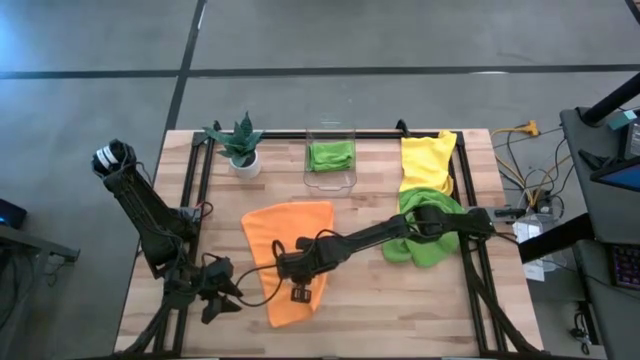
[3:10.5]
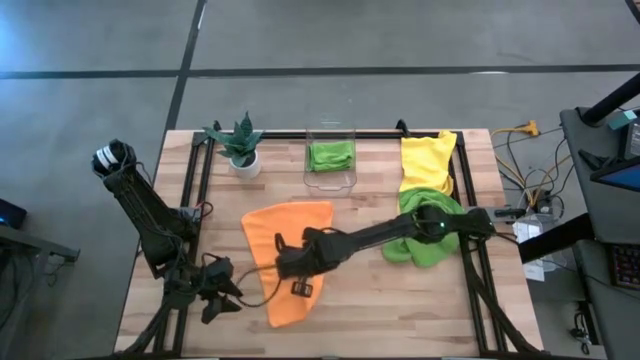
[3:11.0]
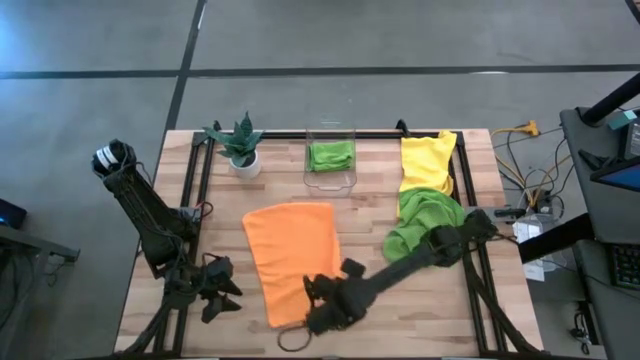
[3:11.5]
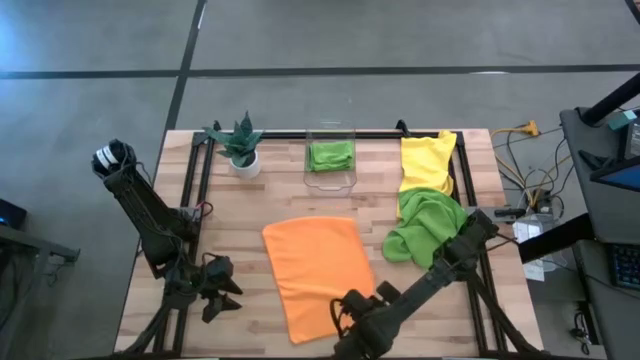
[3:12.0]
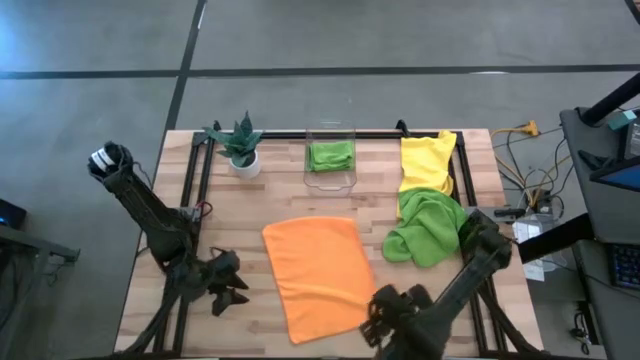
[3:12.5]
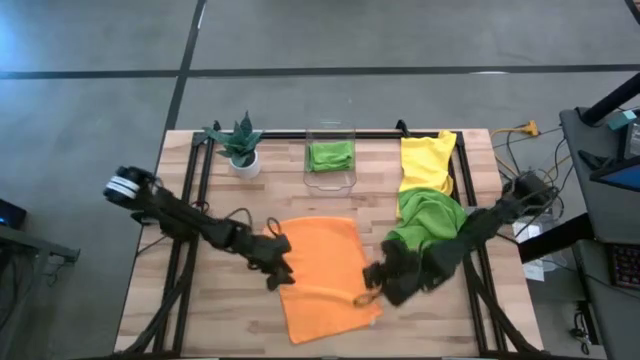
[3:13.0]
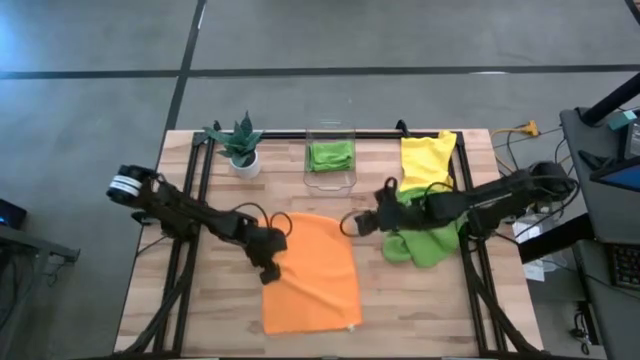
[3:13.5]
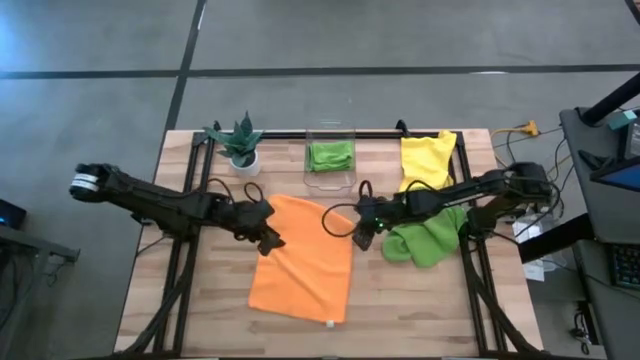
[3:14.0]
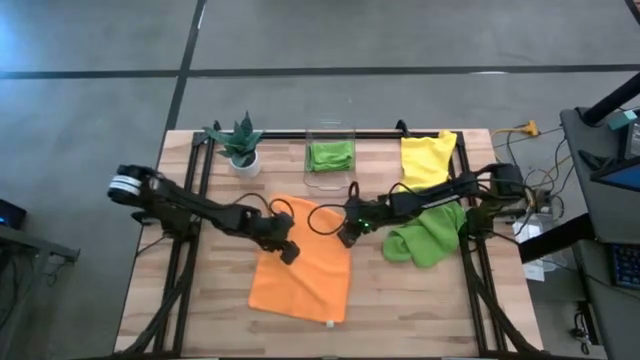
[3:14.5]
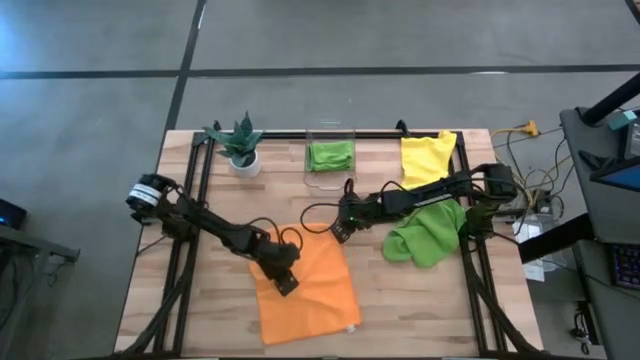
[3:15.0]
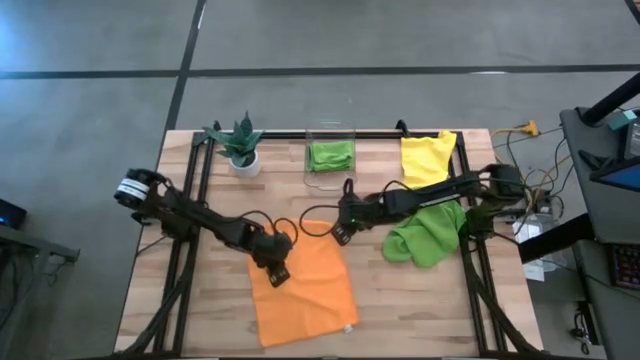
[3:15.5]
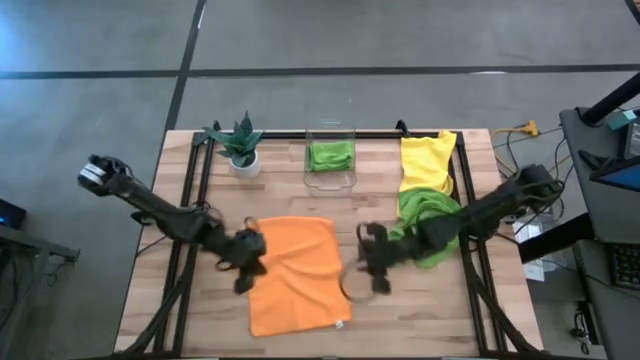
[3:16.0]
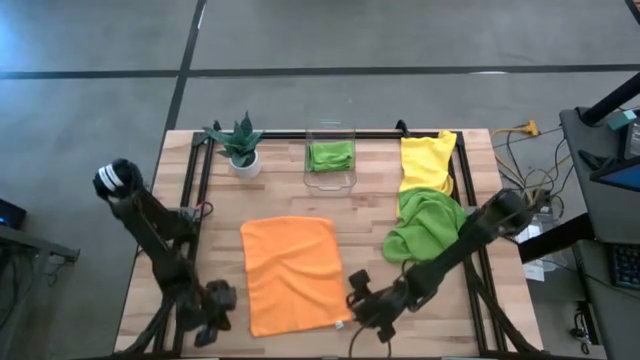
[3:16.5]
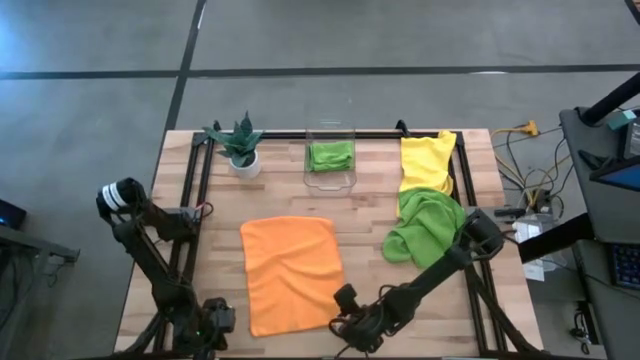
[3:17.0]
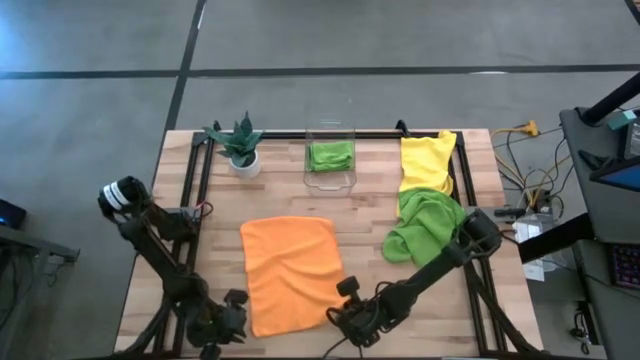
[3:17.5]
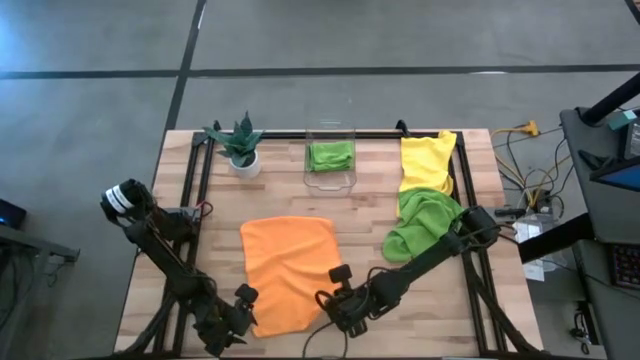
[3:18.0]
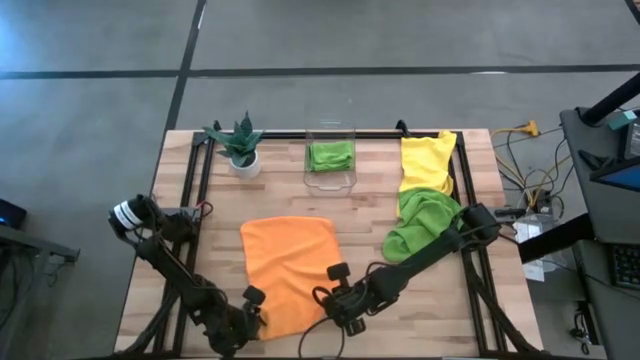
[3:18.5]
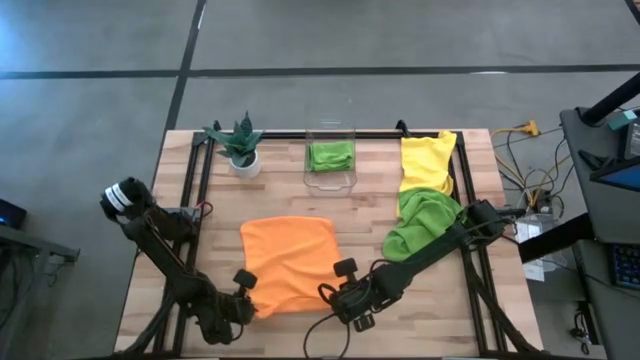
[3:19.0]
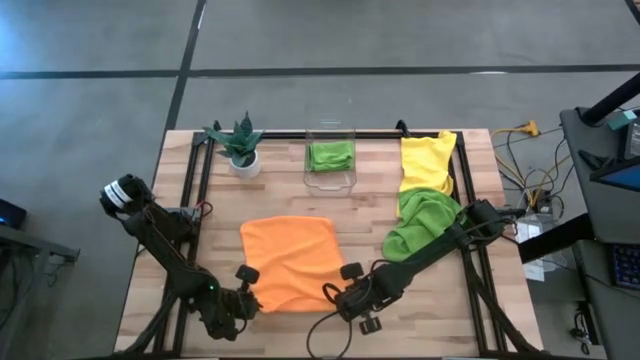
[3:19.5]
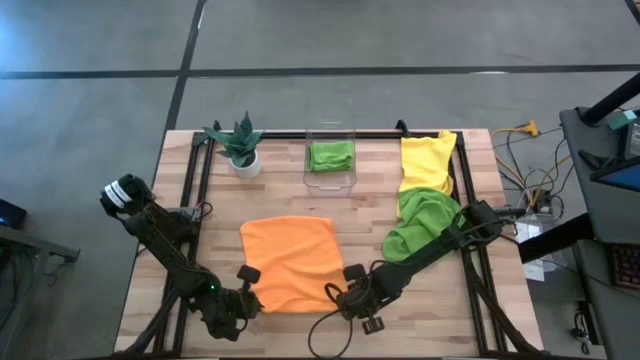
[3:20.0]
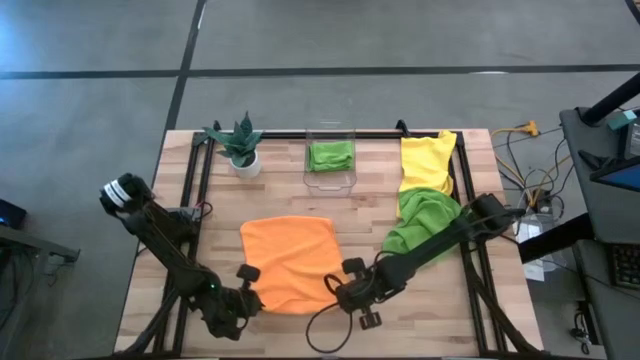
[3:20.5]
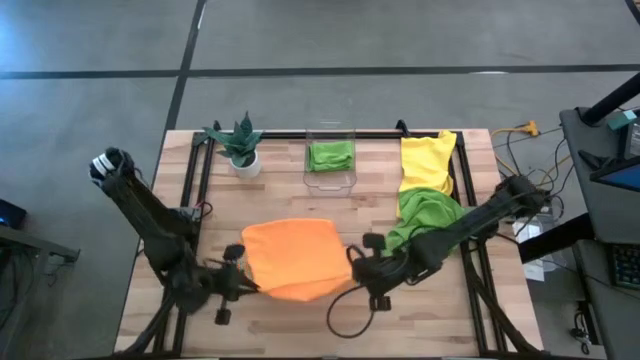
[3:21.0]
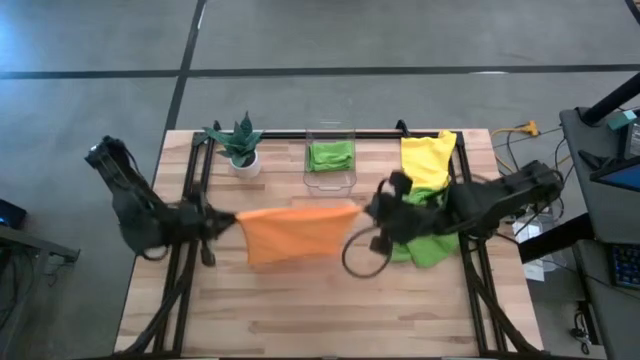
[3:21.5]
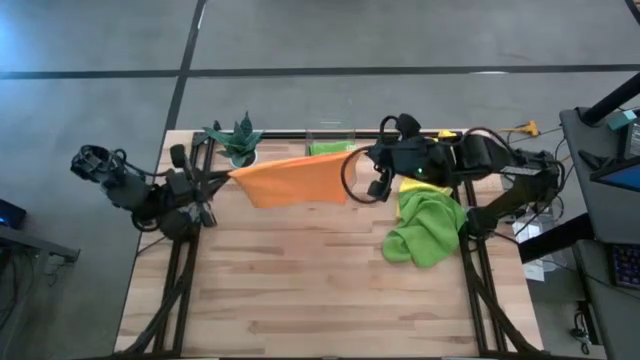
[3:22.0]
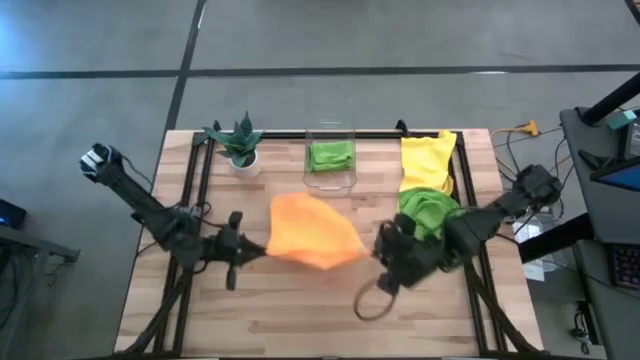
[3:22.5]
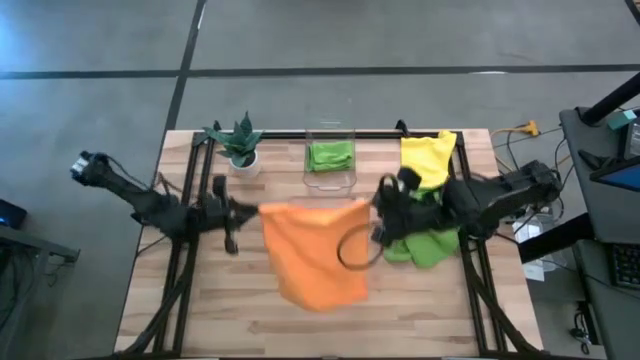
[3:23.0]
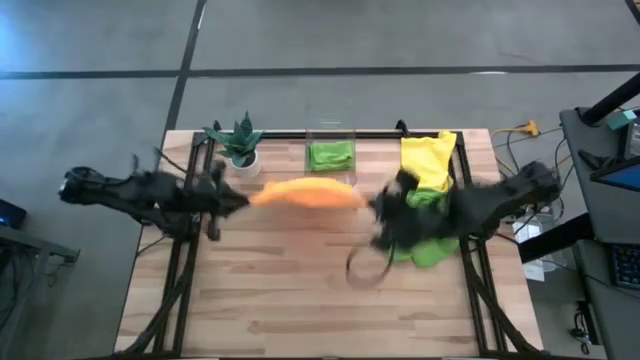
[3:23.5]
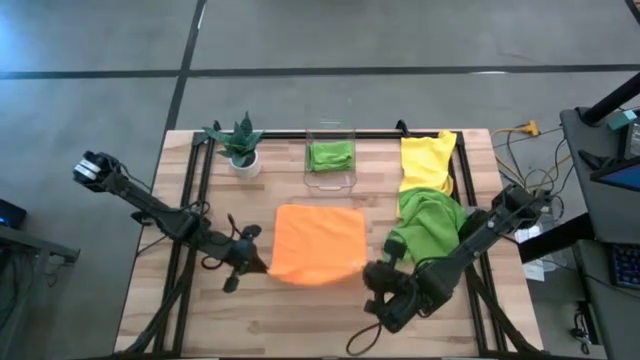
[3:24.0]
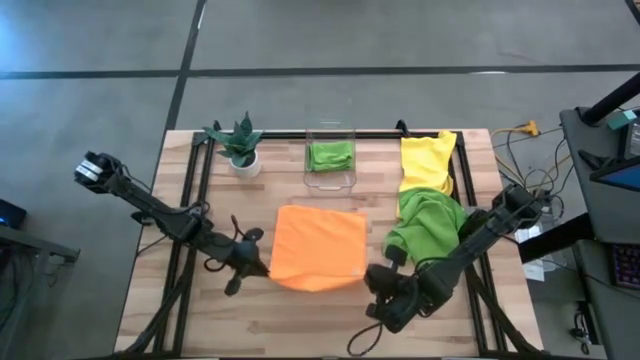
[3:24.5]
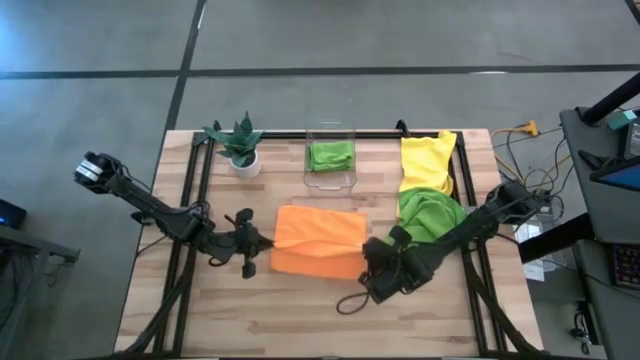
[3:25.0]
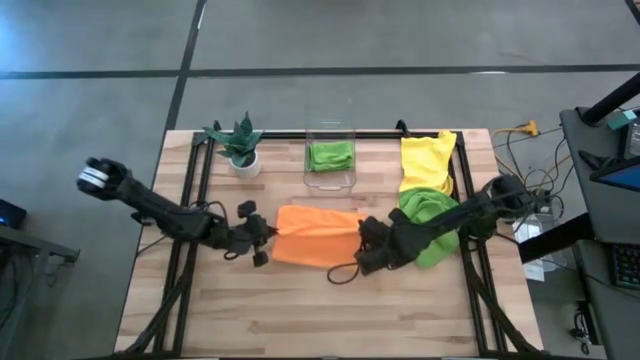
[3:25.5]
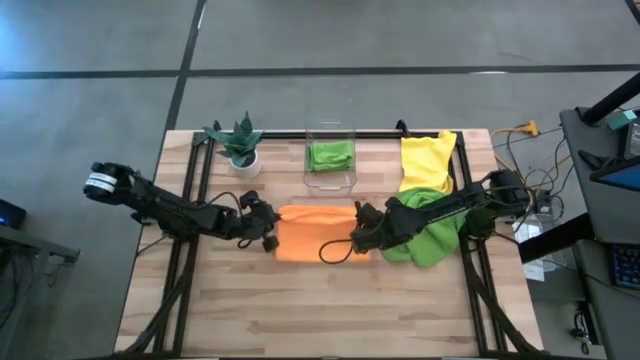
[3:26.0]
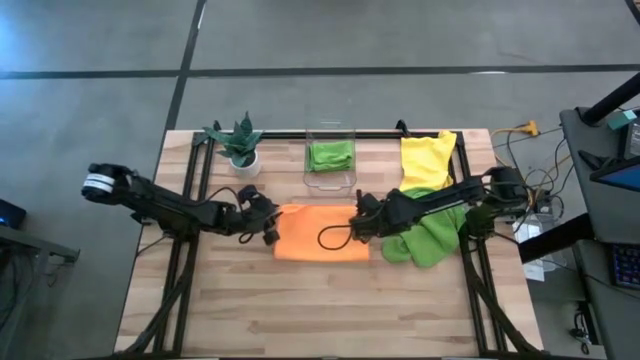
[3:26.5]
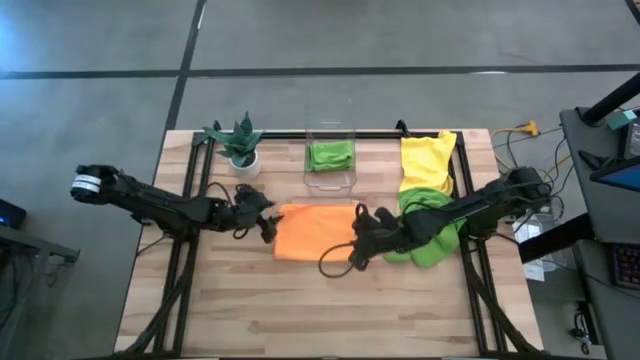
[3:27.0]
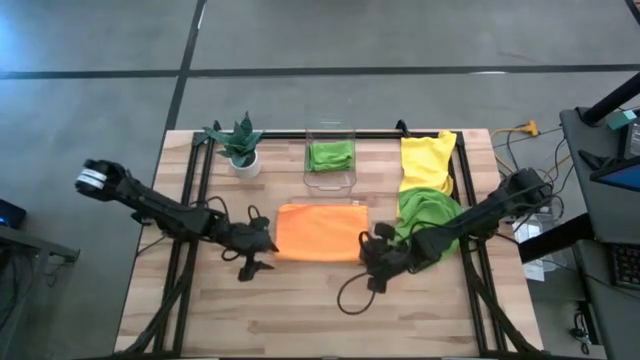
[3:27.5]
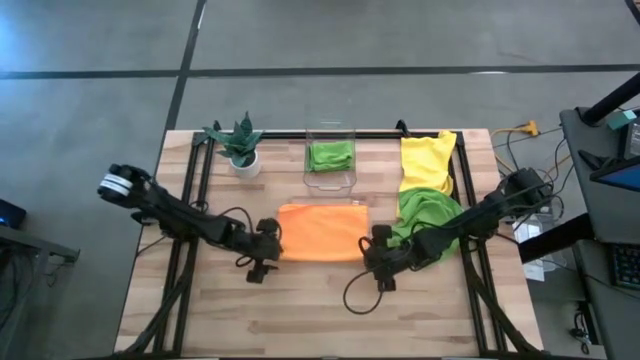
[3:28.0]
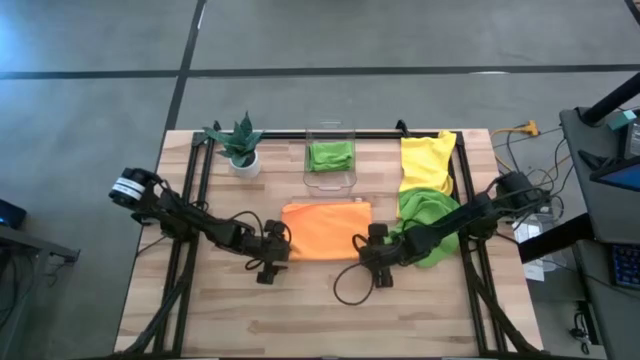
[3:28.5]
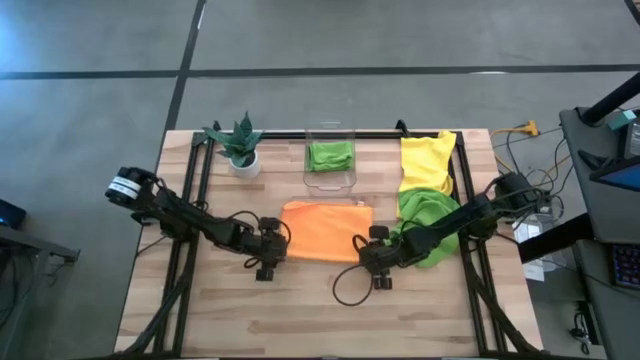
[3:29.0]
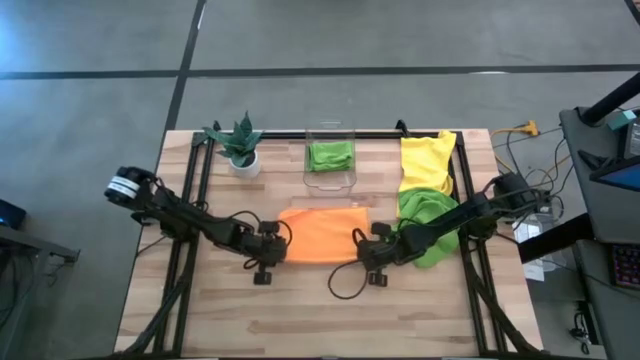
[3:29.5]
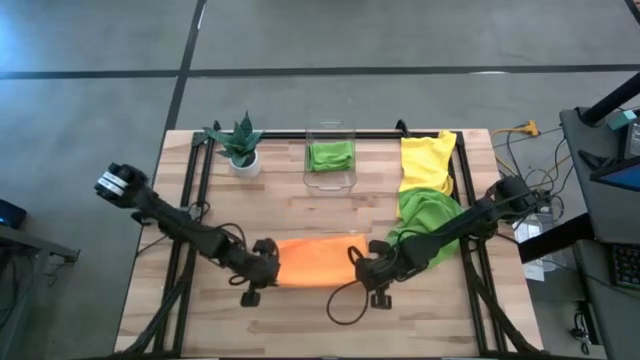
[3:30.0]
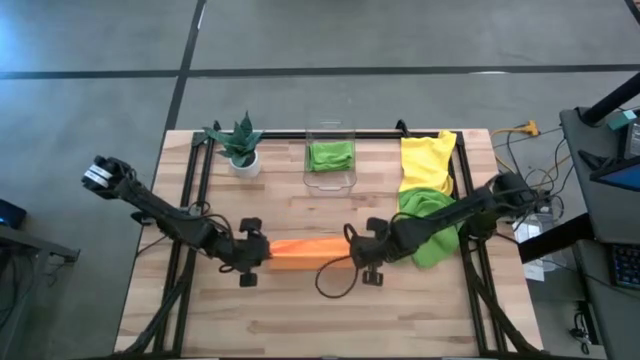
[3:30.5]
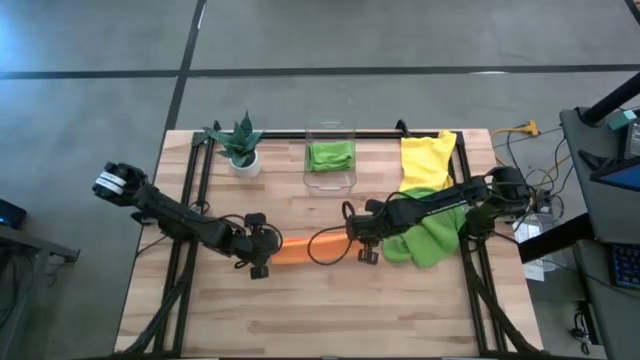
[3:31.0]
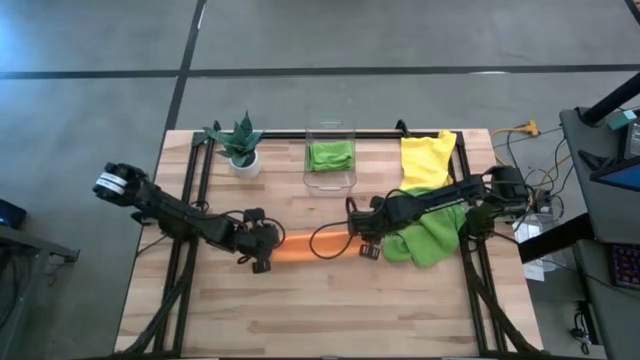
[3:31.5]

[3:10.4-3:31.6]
Task: Fold microfiber towels
Fold the orange towel
